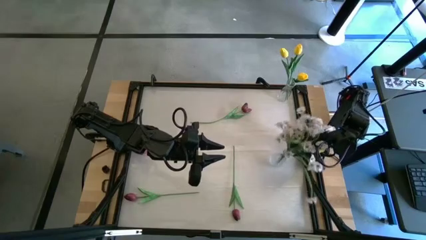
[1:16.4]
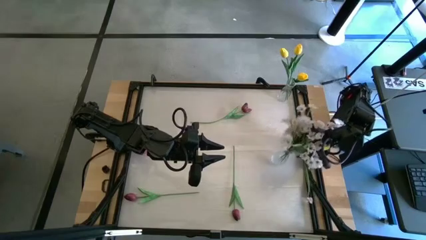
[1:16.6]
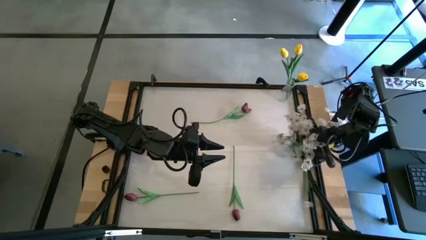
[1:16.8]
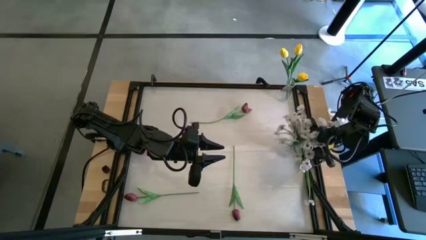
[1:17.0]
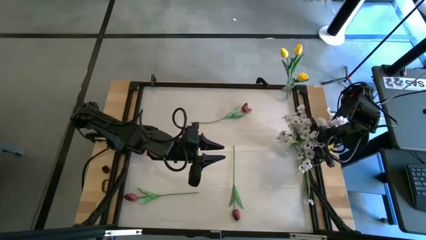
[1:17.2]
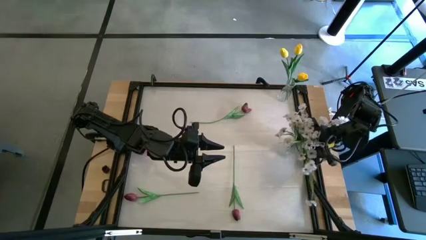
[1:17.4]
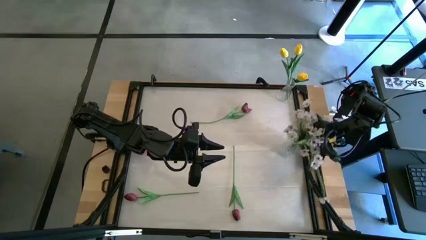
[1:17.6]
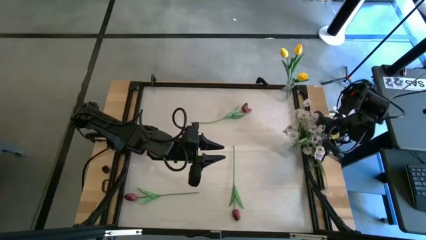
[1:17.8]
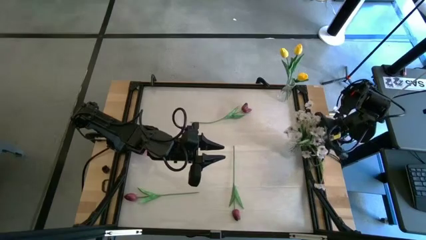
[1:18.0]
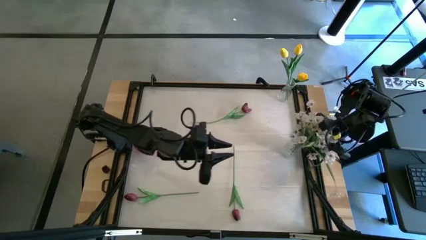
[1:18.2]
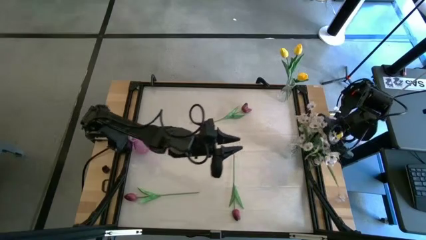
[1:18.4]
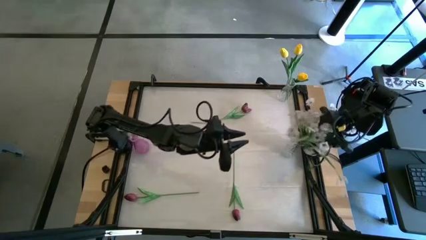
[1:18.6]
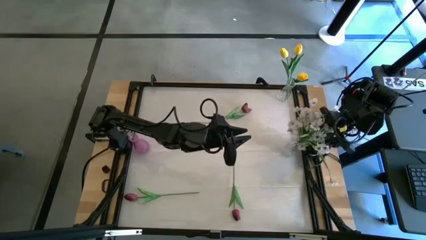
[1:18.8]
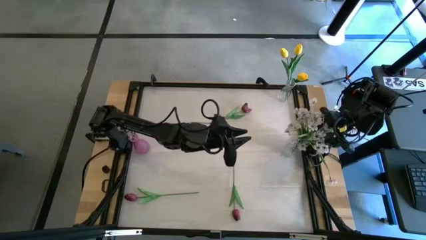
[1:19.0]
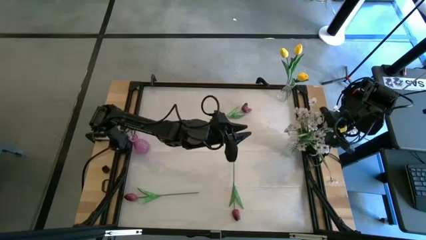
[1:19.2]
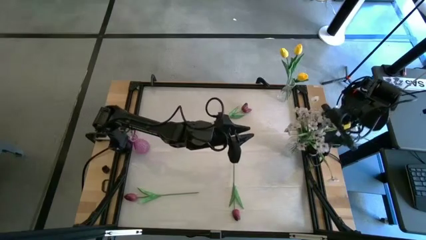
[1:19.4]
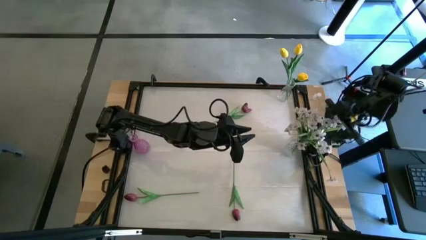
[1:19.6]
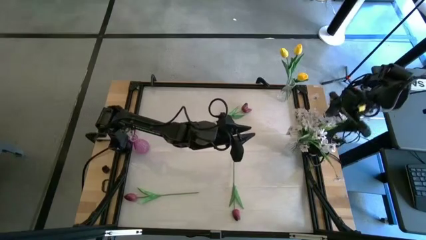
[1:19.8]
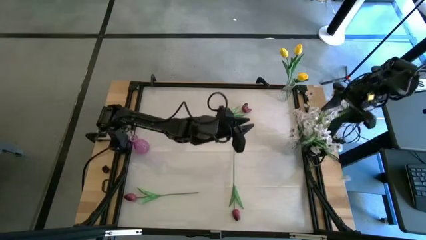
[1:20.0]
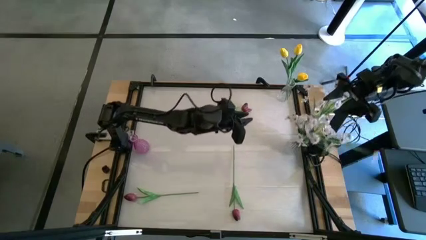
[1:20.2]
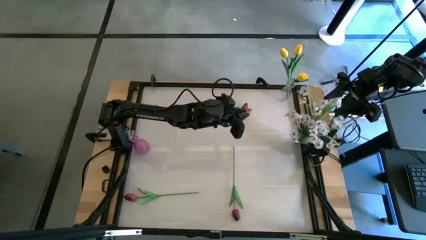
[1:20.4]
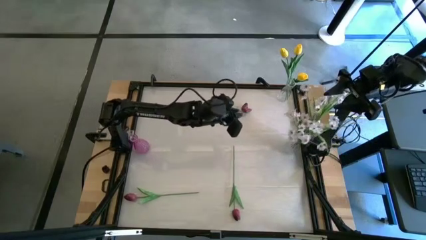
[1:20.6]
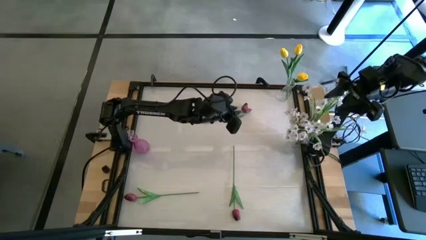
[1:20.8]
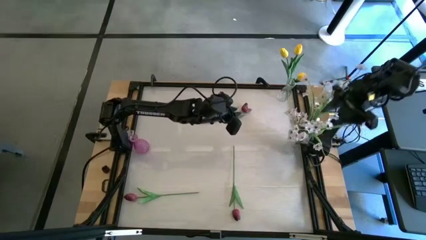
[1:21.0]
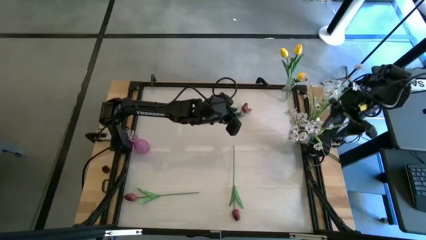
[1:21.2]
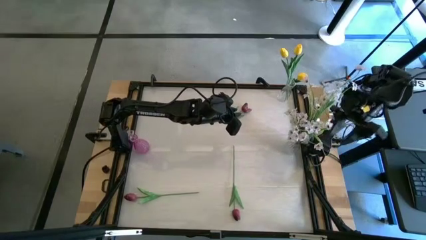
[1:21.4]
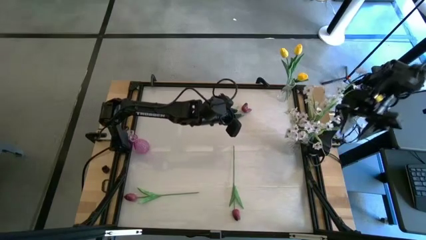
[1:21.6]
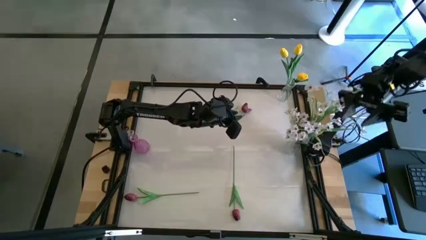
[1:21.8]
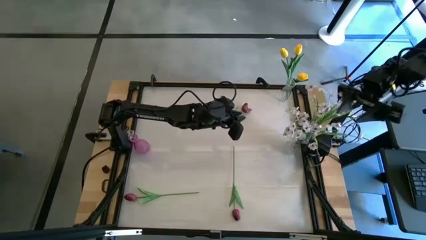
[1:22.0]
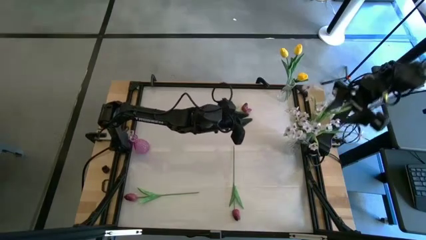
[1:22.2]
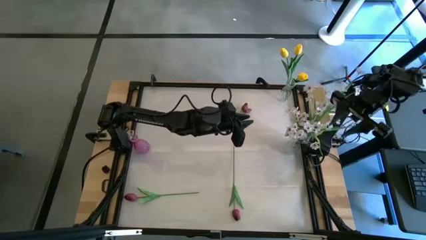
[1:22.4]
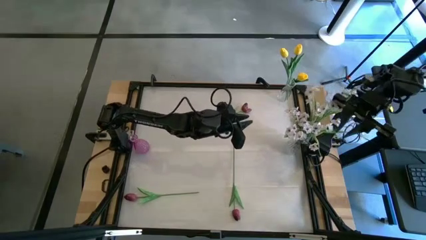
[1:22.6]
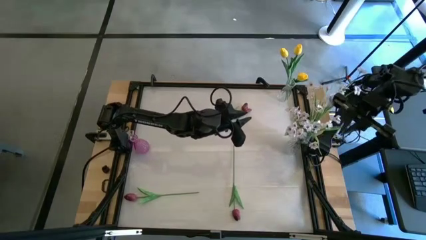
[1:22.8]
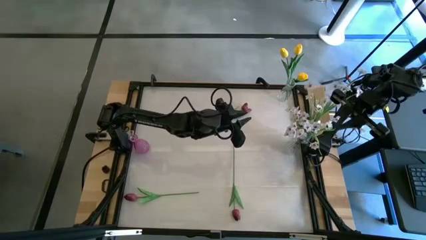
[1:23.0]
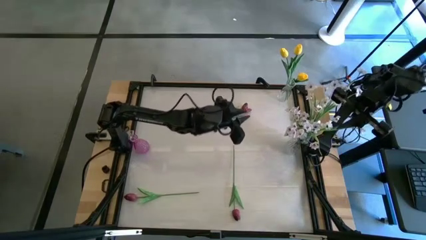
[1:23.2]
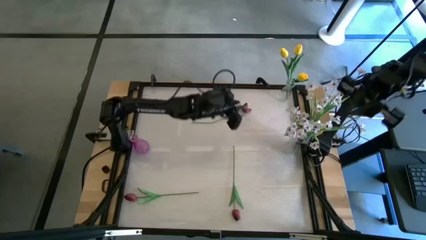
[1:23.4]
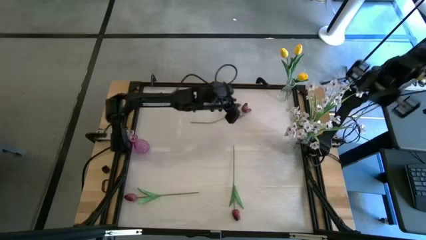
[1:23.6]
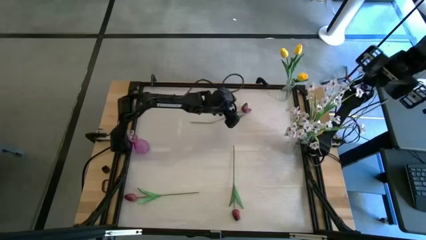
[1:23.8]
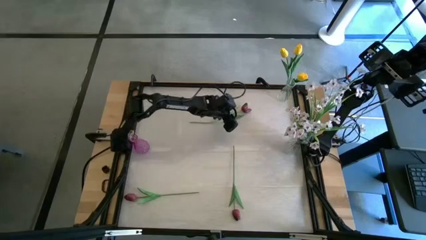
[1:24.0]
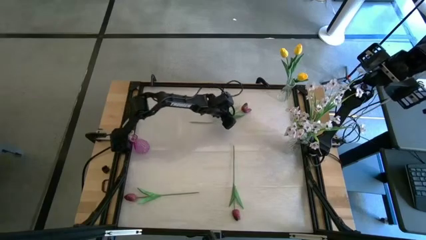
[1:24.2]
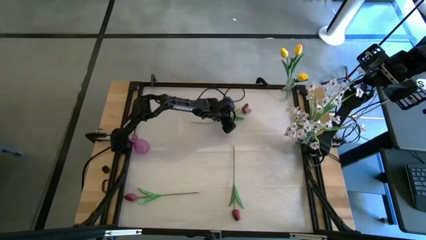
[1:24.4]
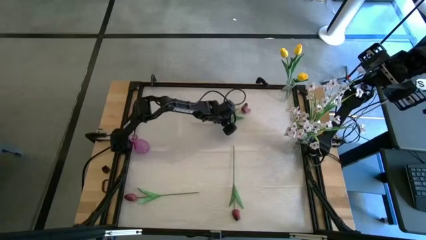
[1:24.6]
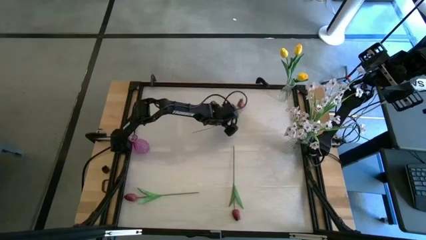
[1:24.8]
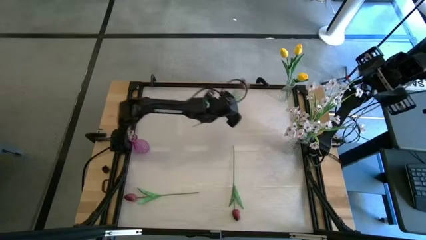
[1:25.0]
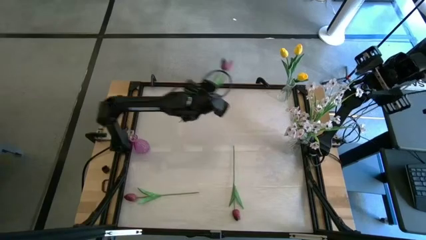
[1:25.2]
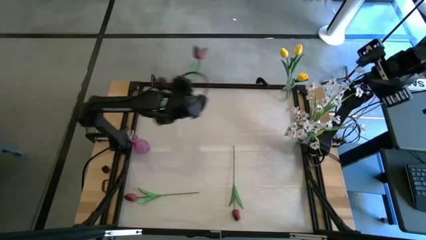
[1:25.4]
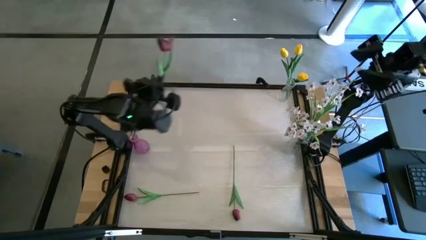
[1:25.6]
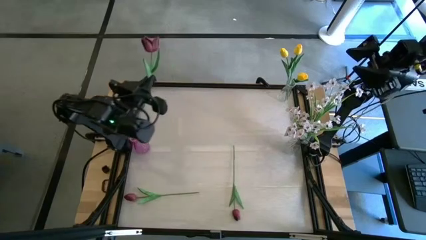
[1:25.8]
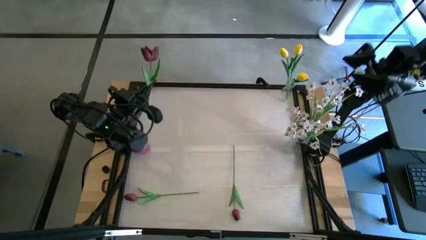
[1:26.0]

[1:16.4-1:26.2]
Task: Sort flowers into vase by color
Put the top red flower into the purple vase

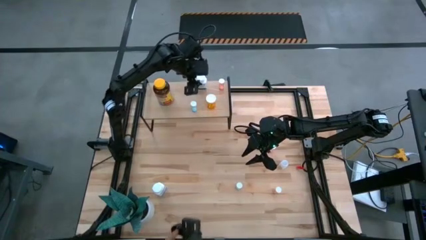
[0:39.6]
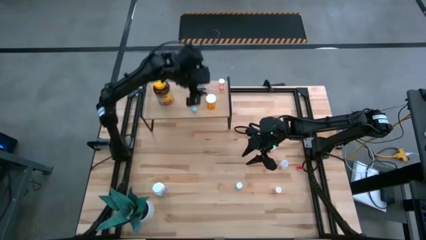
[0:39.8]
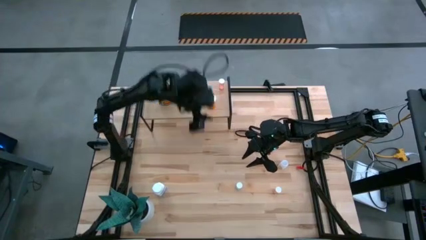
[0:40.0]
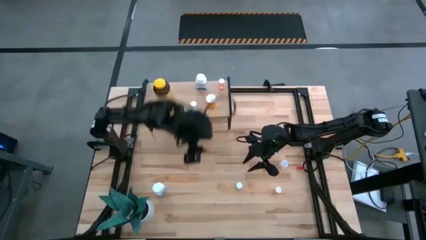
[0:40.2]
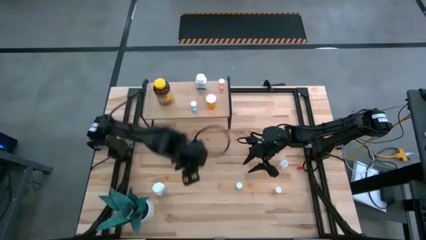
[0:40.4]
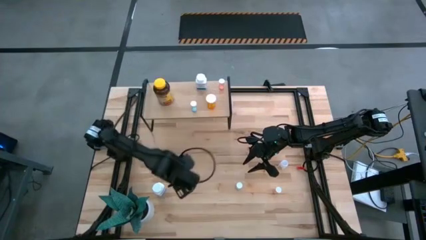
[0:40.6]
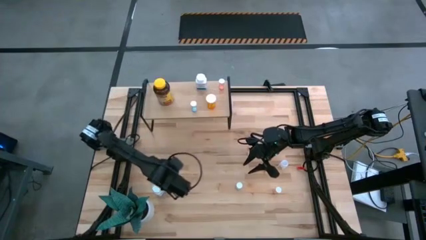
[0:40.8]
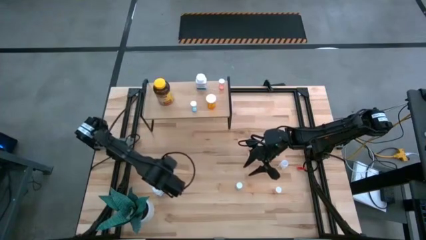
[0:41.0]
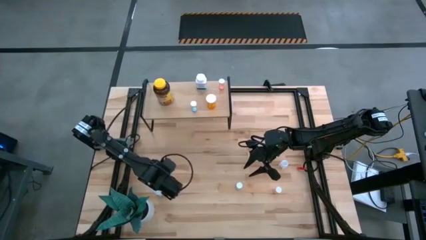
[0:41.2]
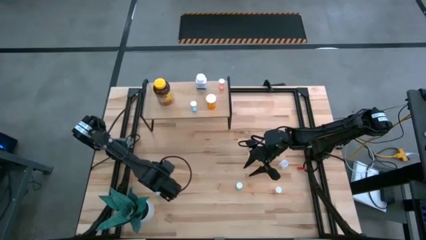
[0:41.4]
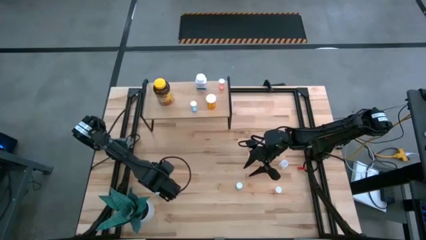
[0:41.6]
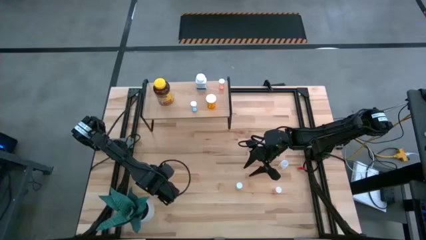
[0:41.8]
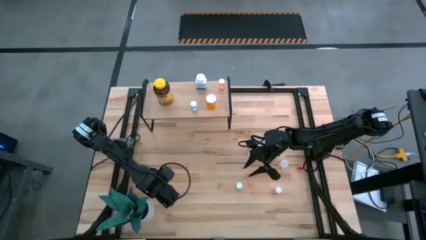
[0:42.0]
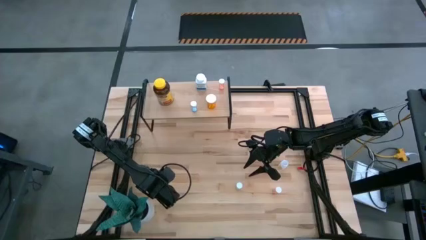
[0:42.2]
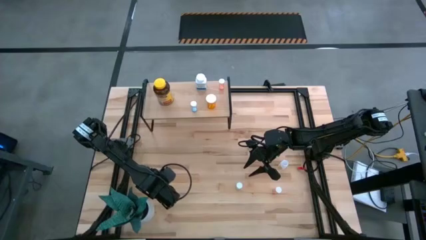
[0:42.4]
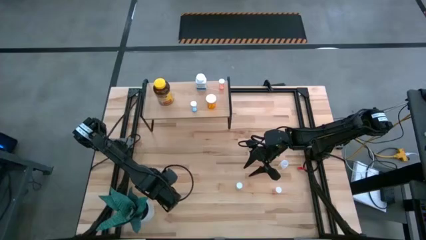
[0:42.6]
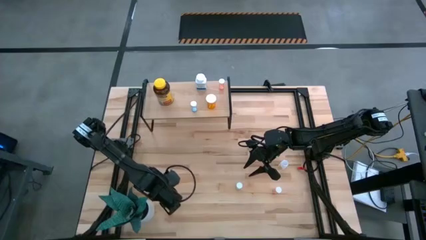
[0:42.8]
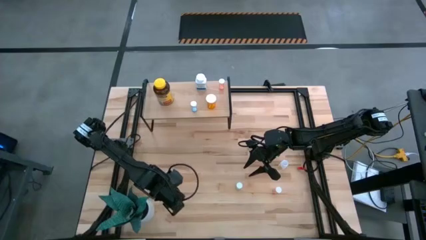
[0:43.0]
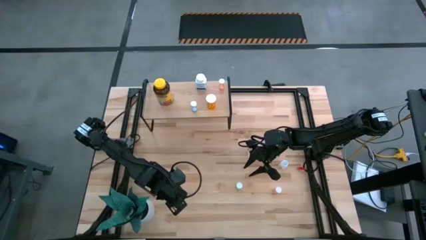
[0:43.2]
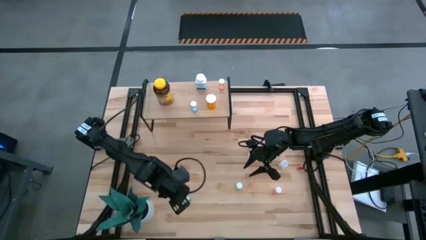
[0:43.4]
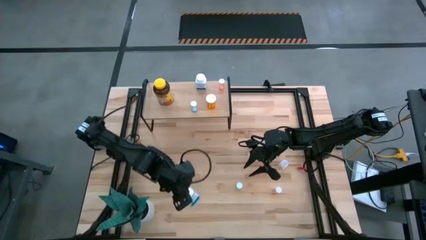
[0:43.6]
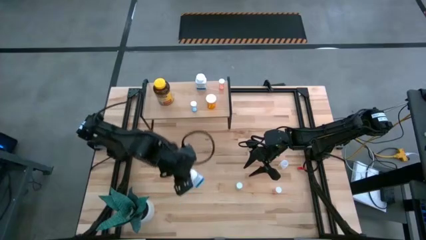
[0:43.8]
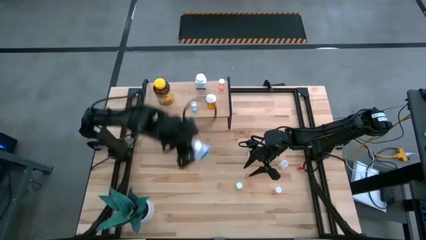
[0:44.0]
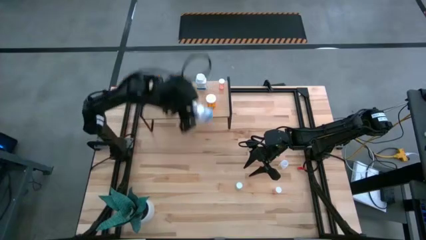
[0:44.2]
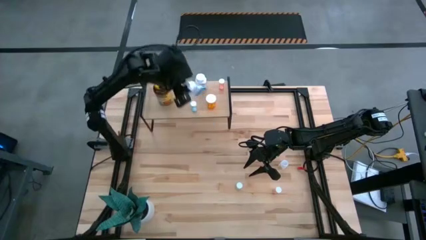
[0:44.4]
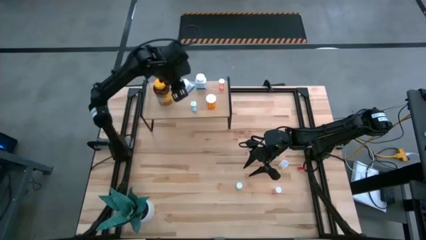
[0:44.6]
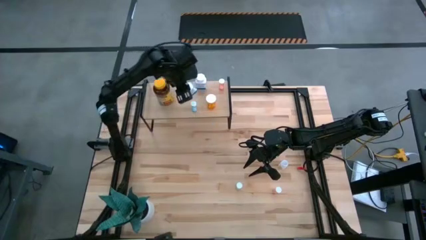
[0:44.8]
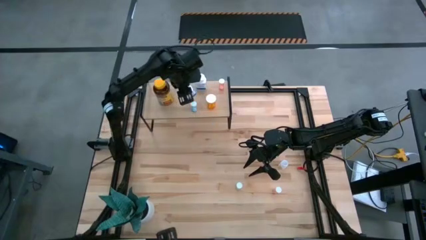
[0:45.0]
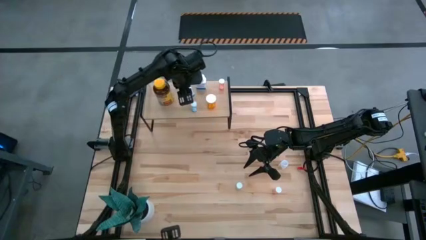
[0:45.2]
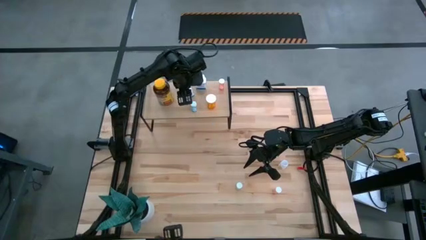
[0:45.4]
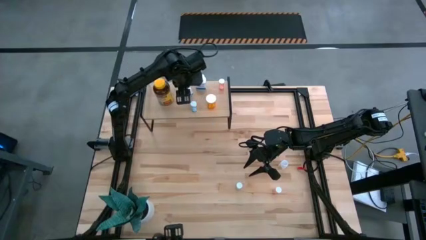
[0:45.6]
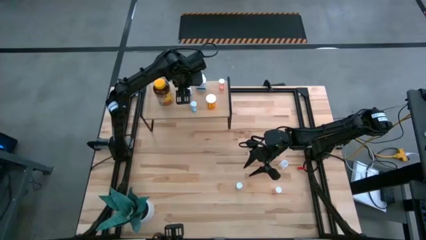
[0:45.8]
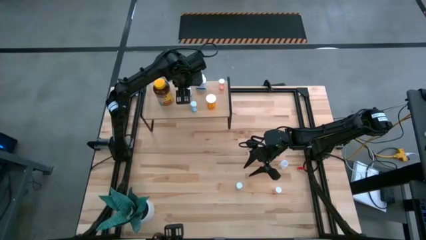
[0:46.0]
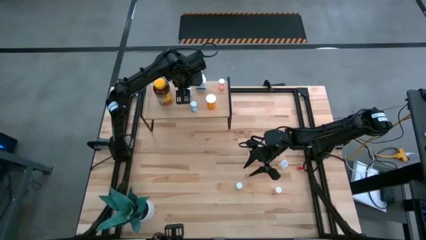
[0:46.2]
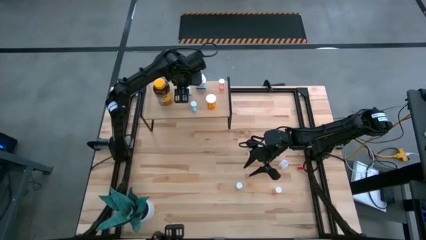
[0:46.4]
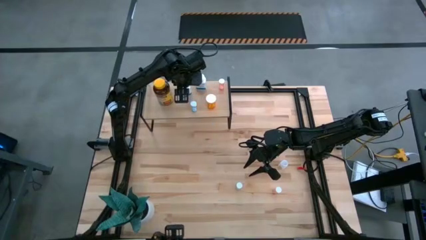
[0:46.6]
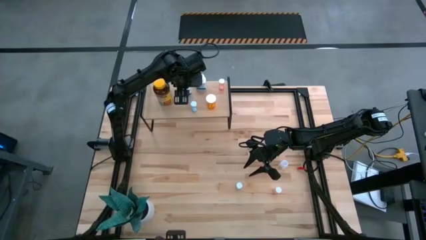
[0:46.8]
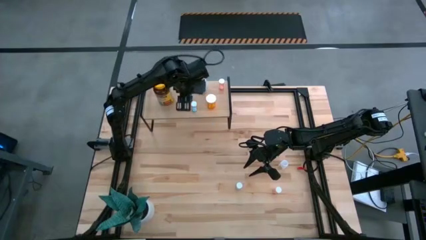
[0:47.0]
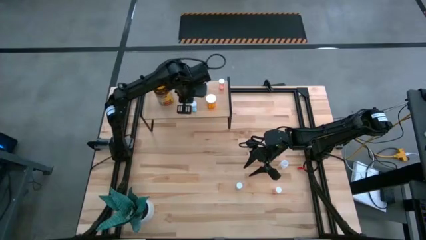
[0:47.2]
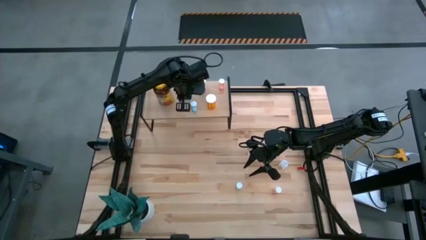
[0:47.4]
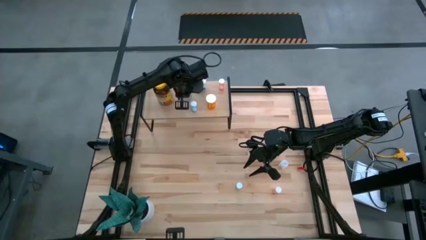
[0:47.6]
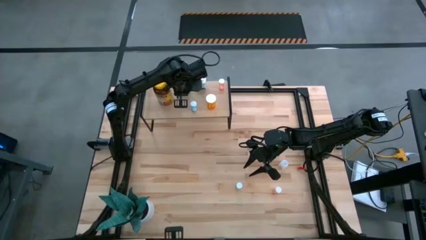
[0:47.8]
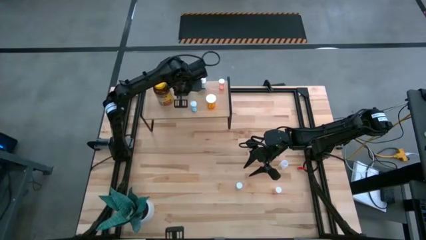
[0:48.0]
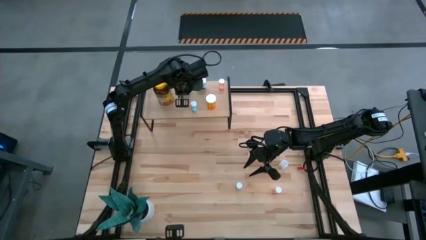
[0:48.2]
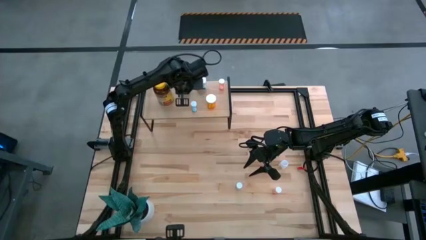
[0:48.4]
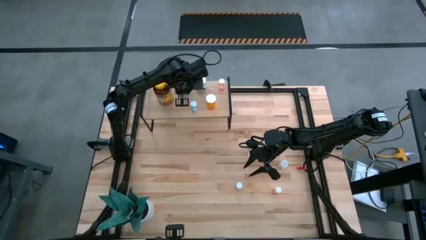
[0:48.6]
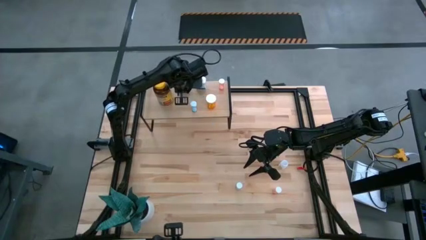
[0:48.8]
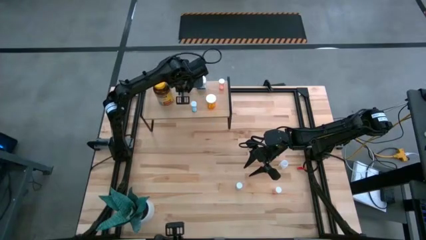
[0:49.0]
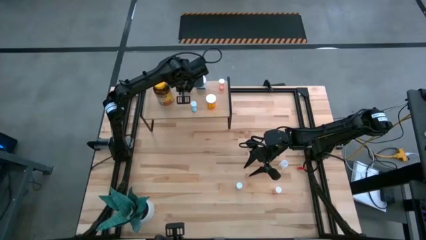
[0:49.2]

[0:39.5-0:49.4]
Task: Pick and place medicine bottles onto shelf by color
Put the white pill bottle on the shelf
